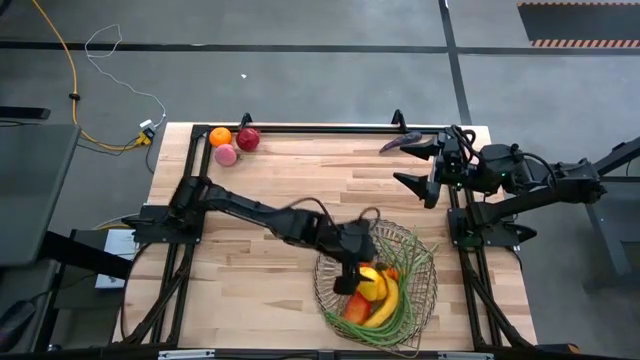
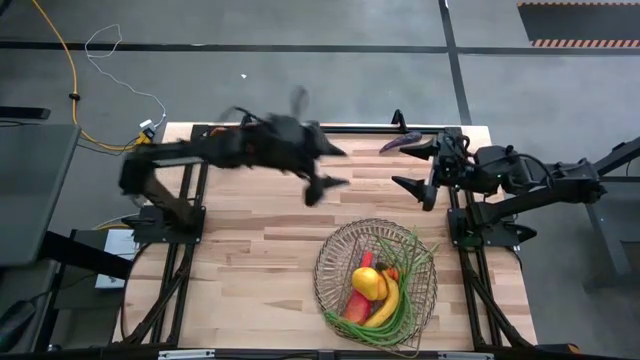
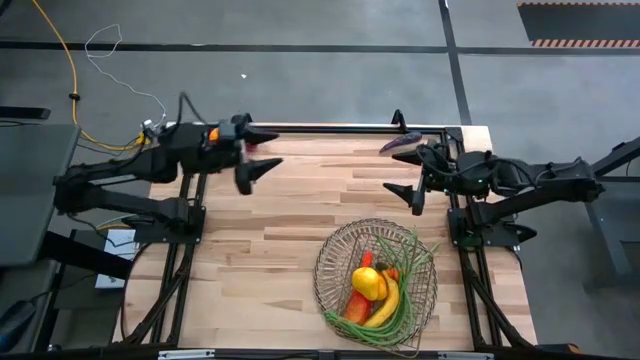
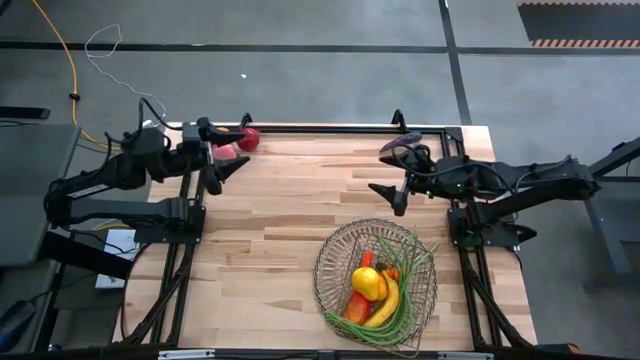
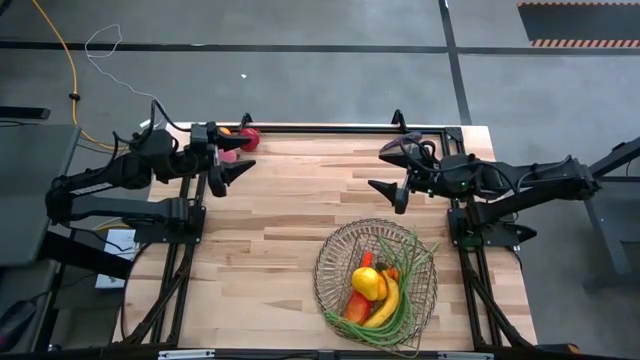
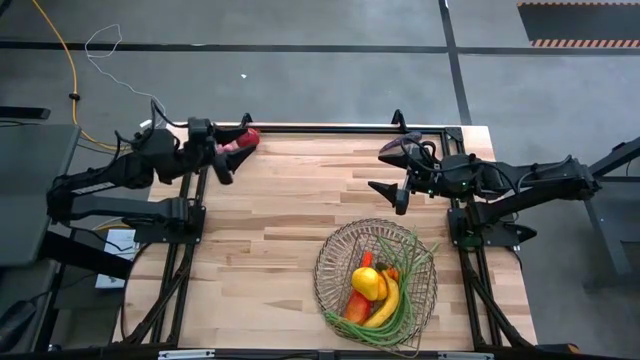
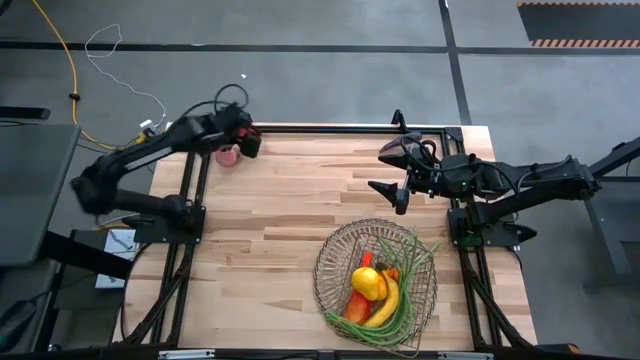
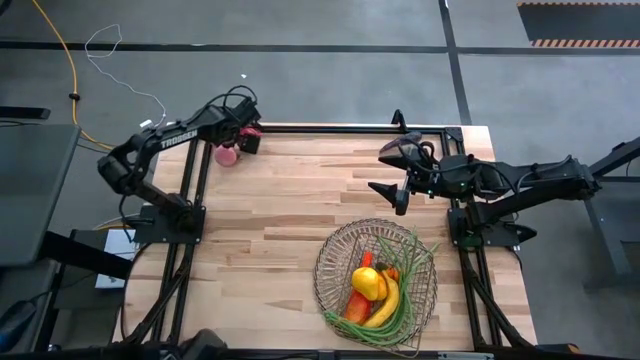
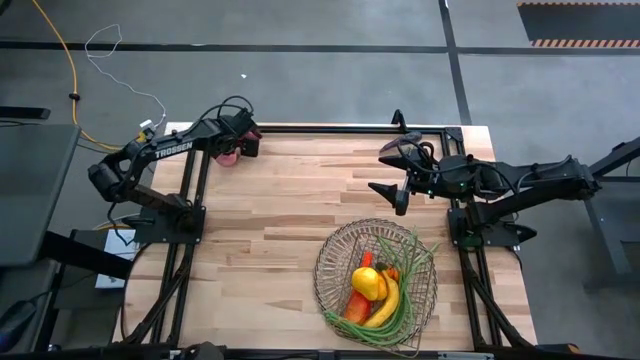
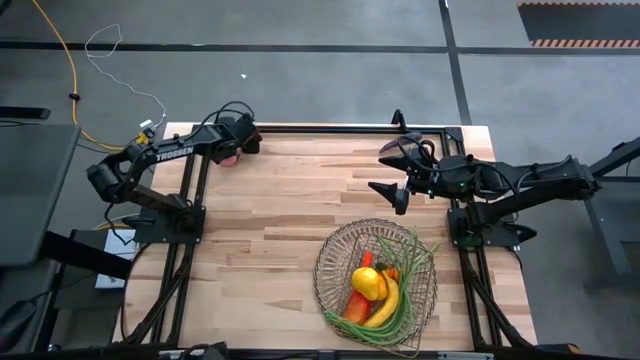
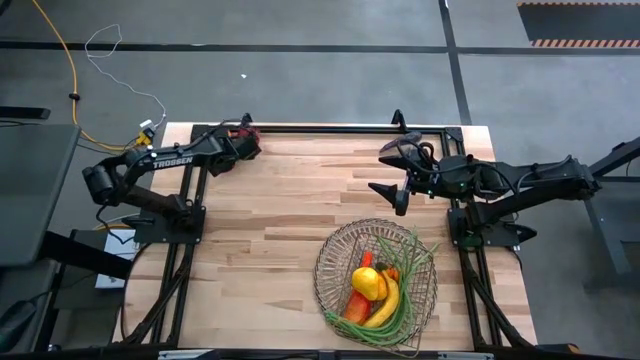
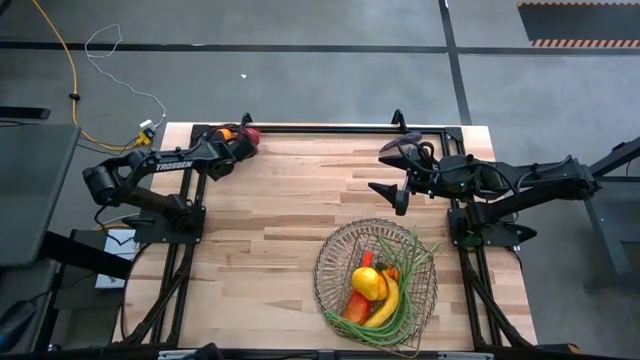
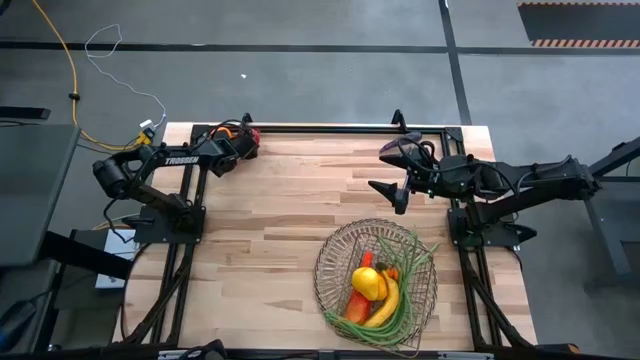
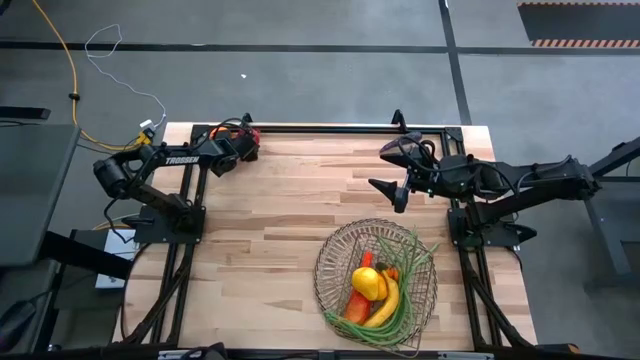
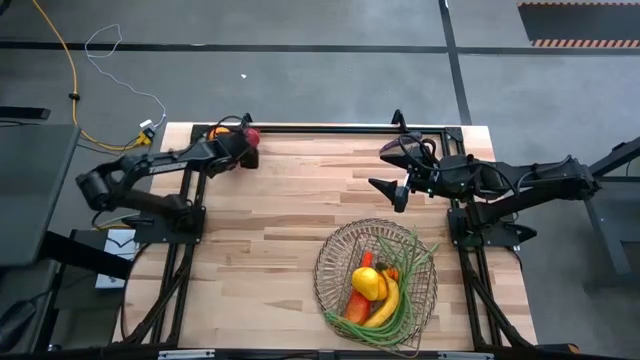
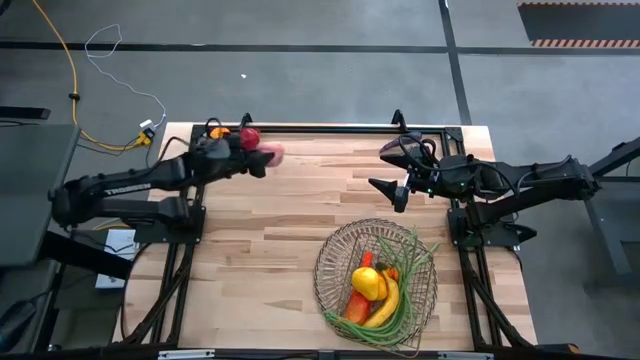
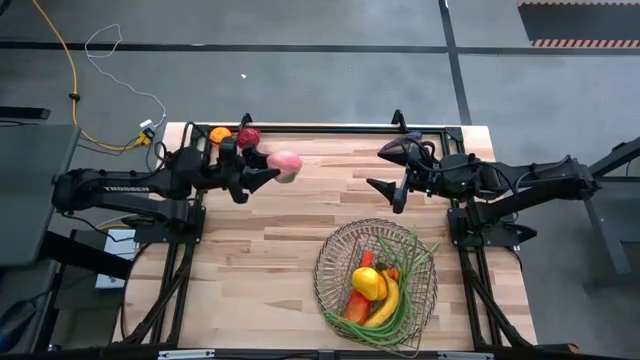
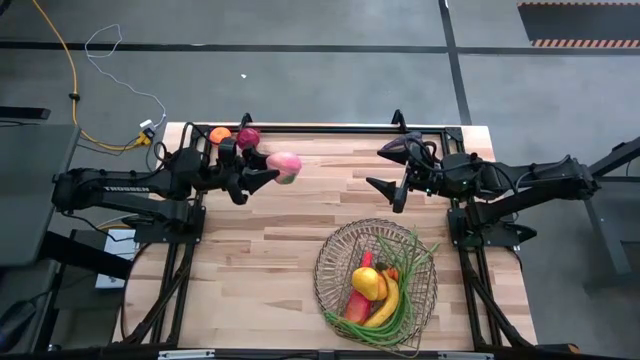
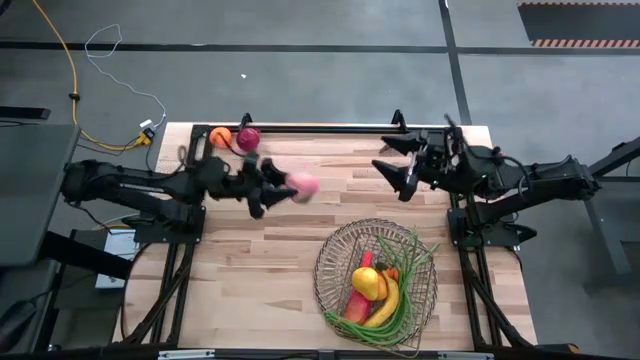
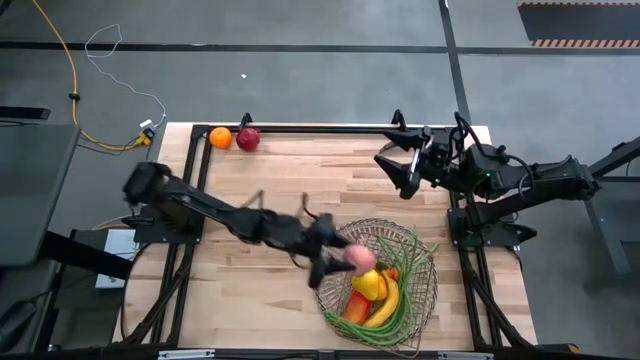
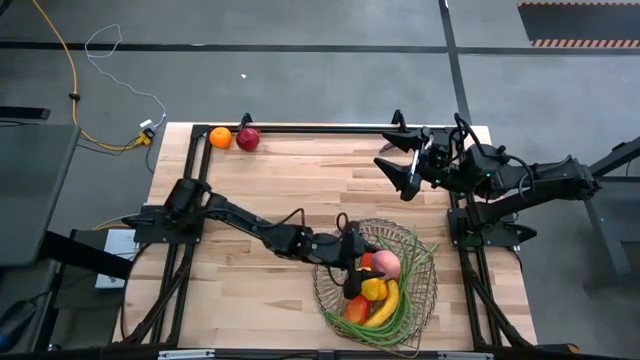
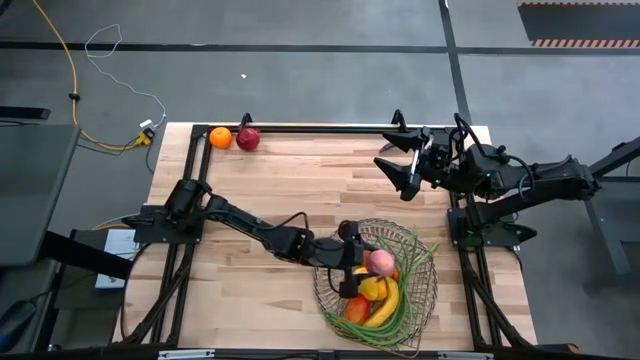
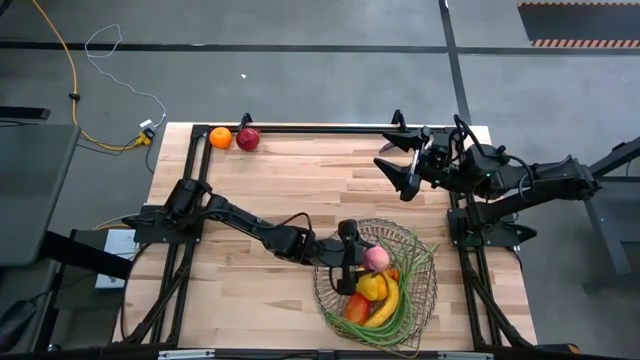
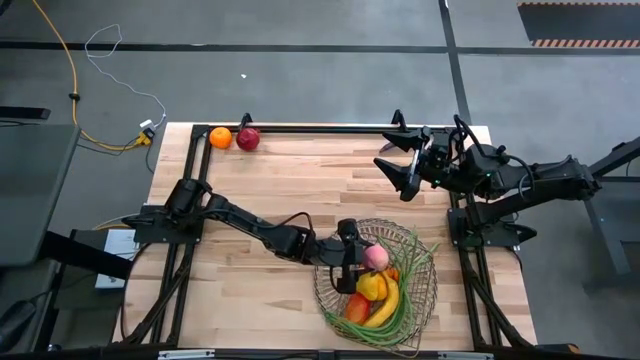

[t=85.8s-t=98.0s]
Task: Build produce basket
Put the peach into the wire basket

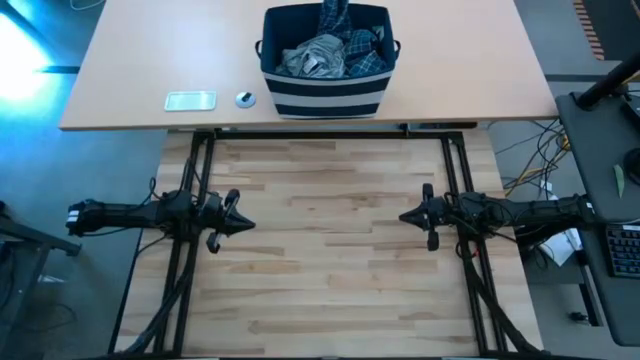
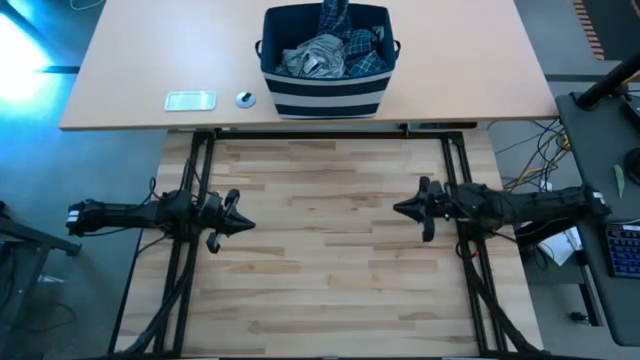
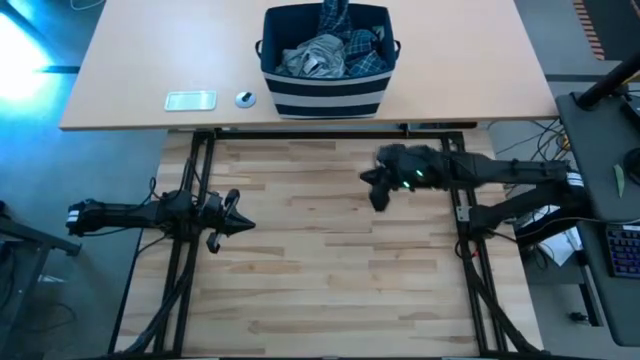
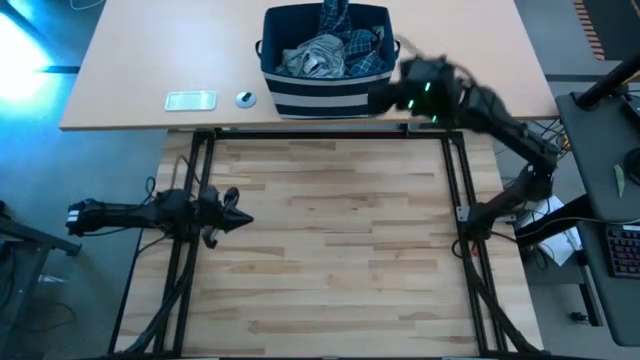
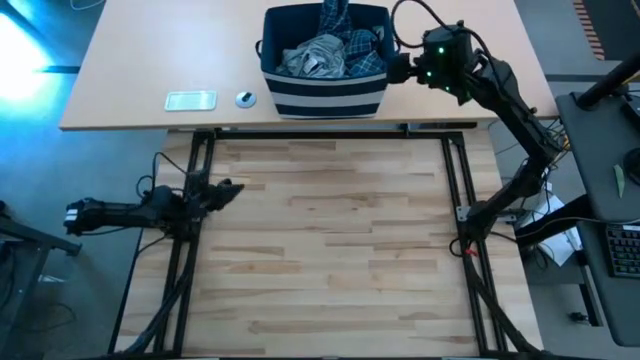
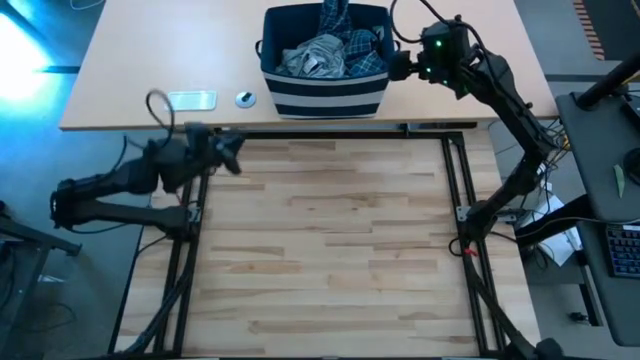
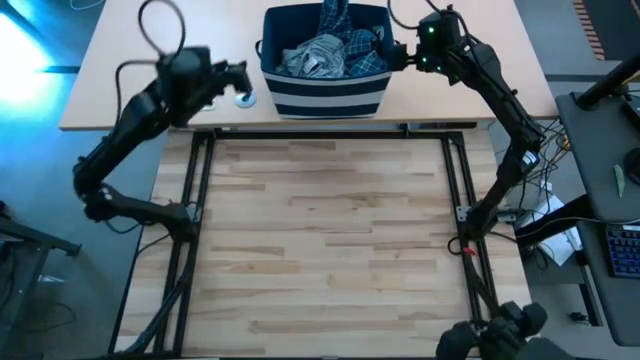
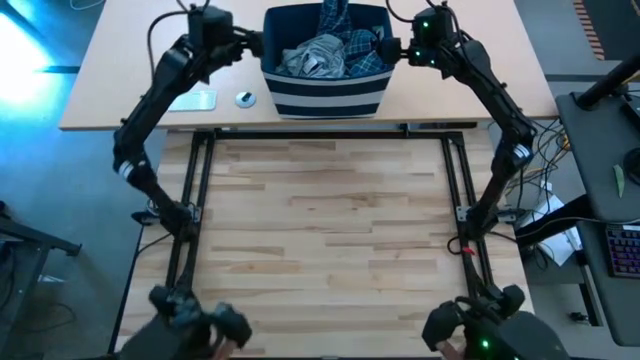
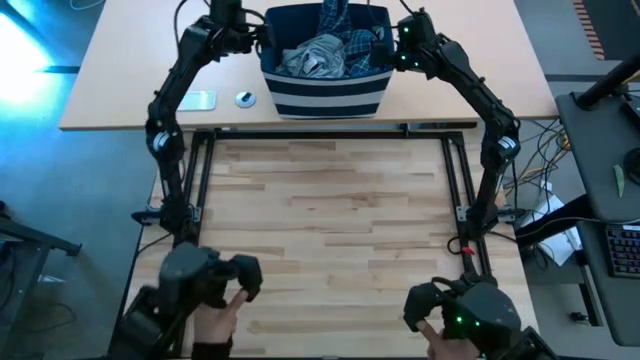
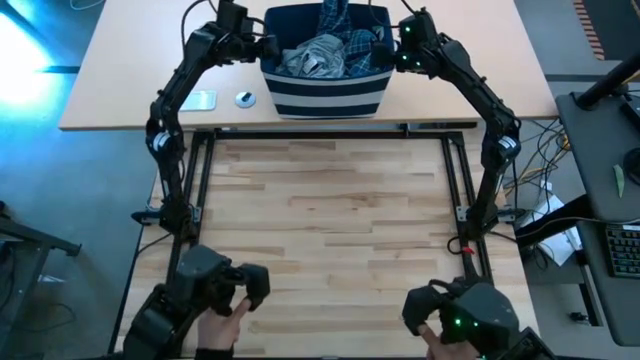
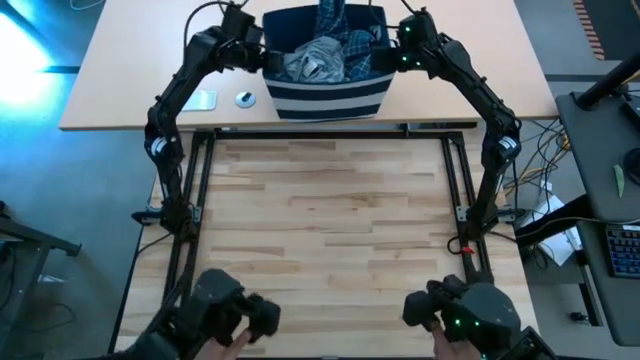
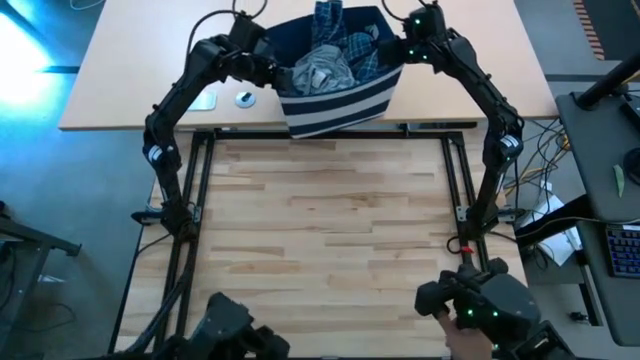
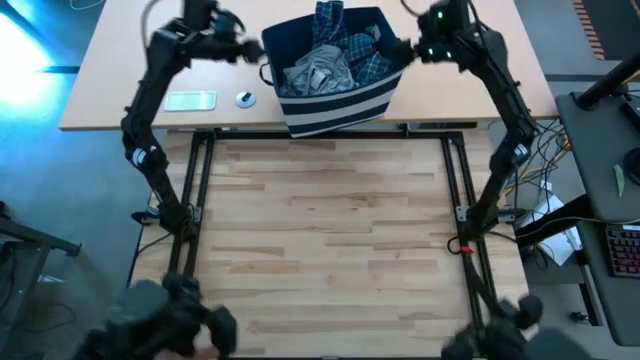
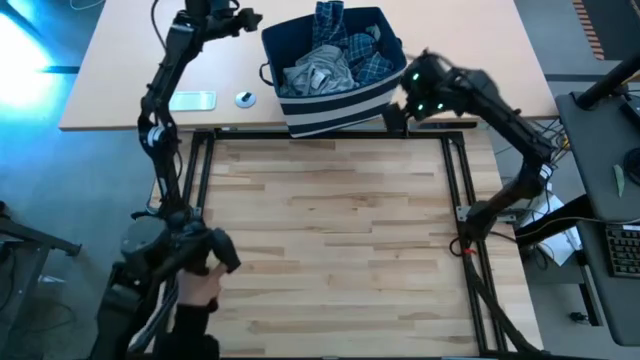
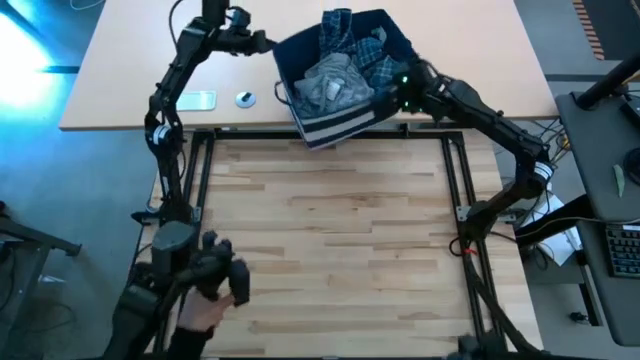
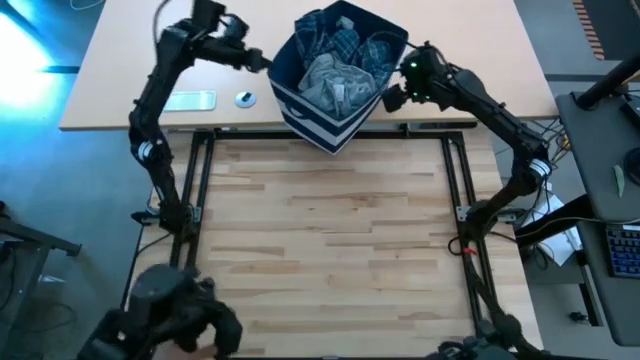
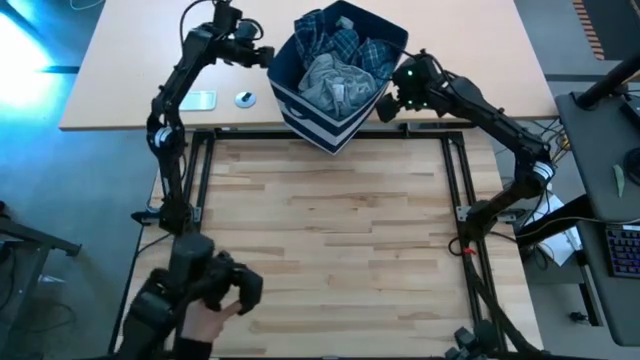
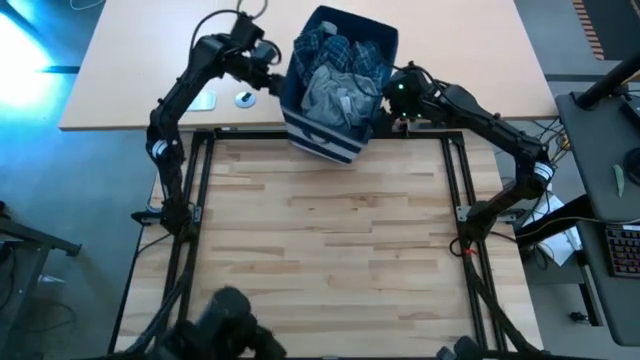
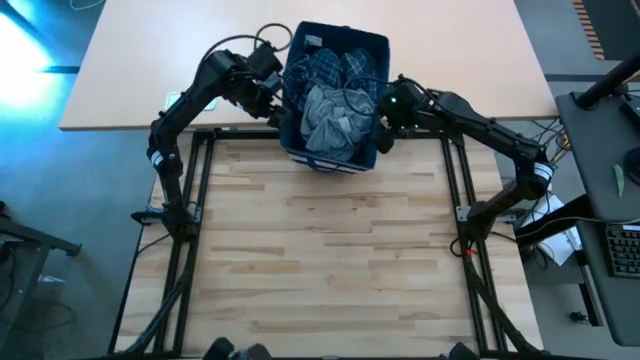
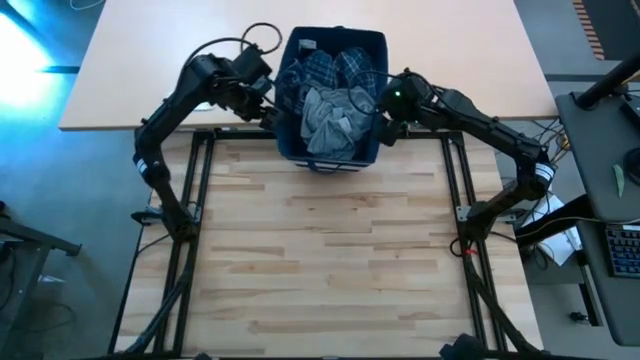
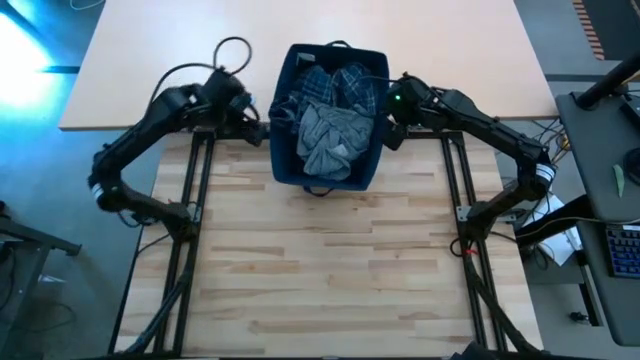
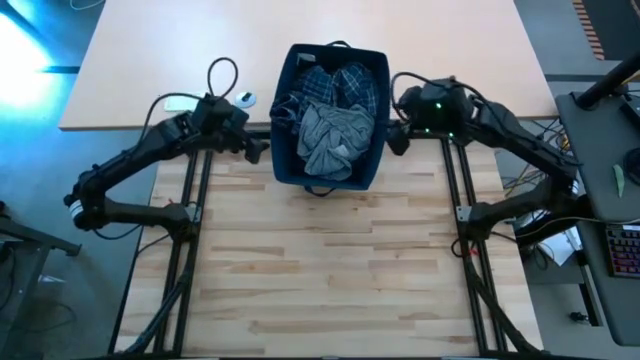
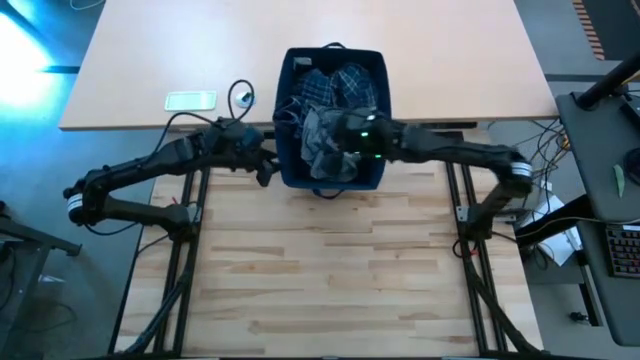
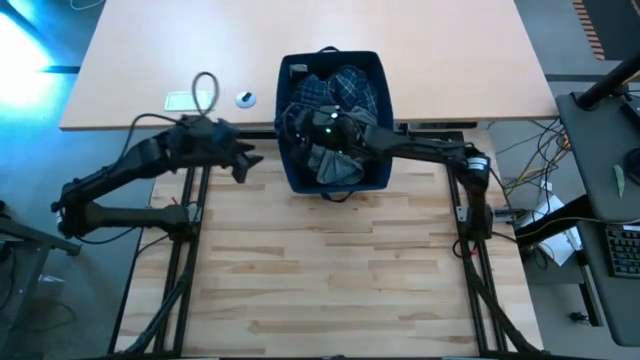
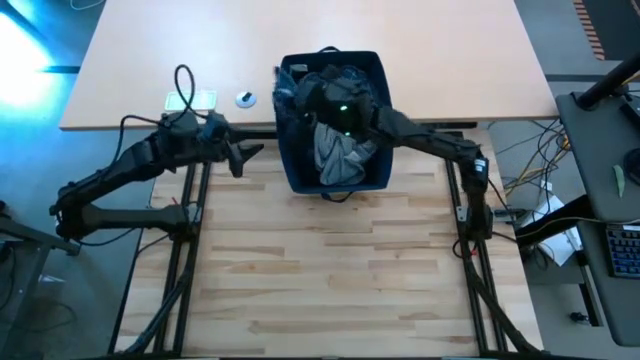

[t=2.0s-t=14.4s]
Task: Fold Laundry from Bin
Remove the blue patterned pants from the blue laundry bin
